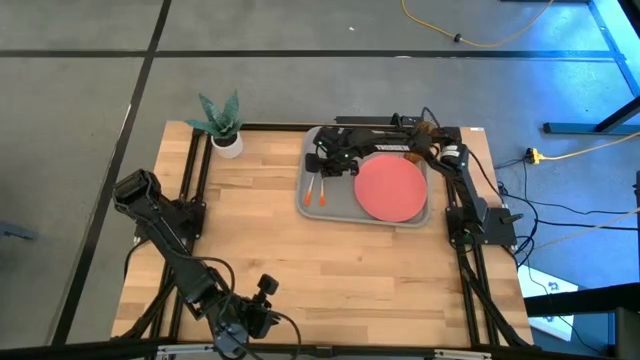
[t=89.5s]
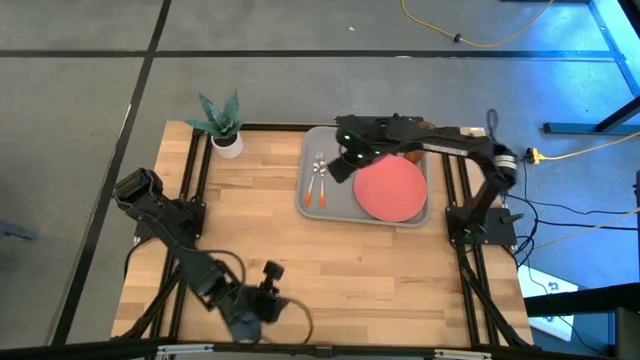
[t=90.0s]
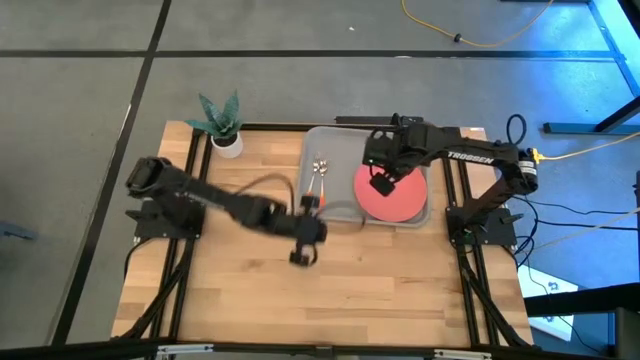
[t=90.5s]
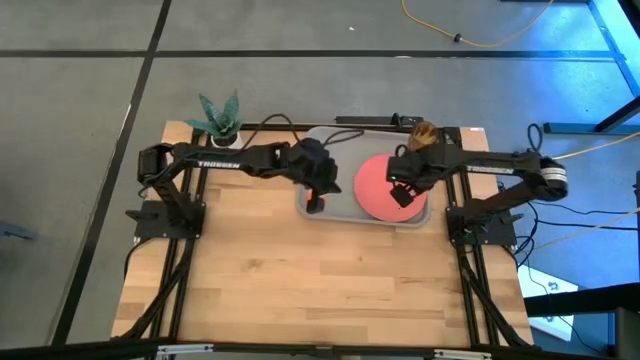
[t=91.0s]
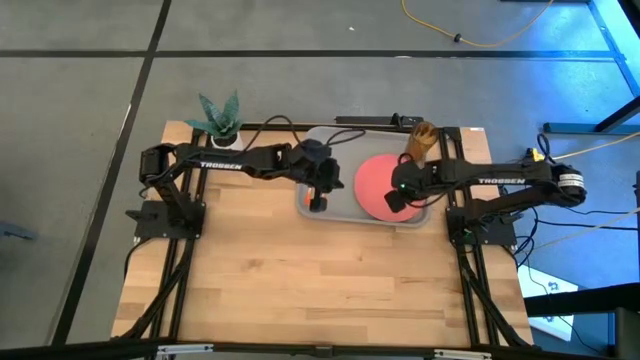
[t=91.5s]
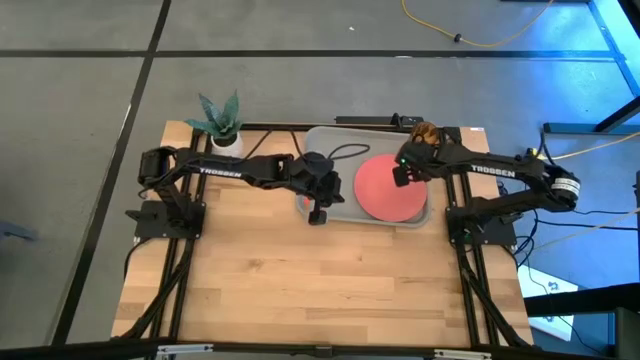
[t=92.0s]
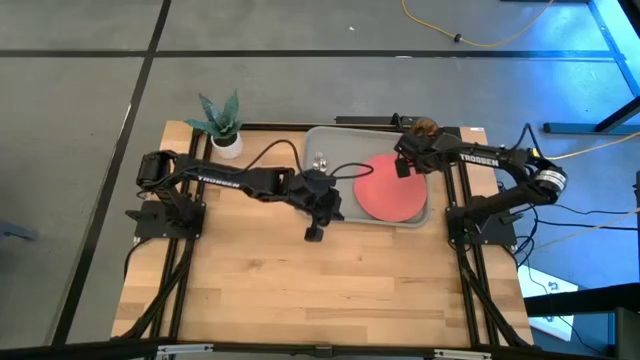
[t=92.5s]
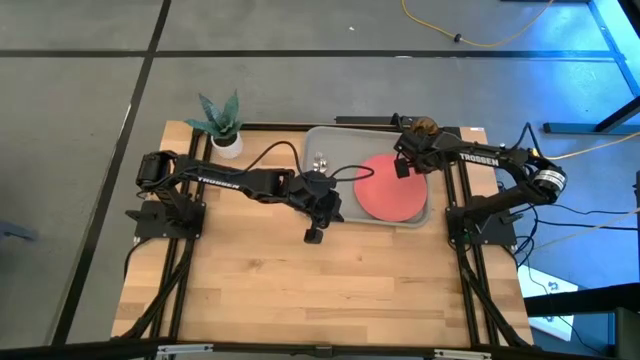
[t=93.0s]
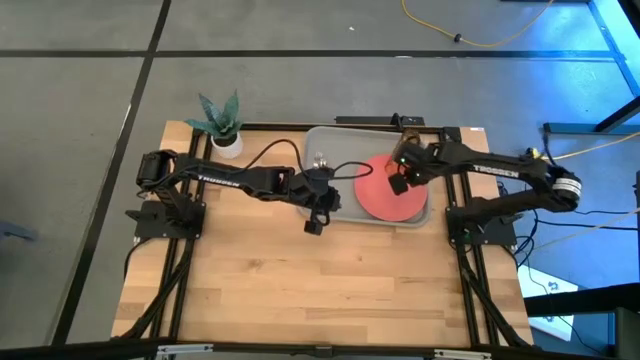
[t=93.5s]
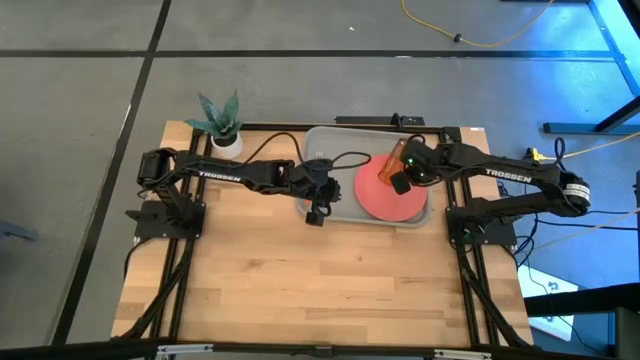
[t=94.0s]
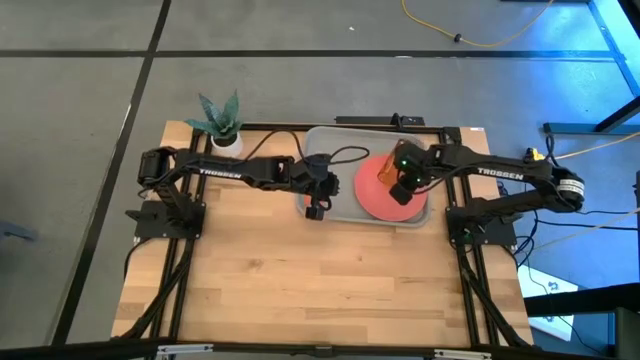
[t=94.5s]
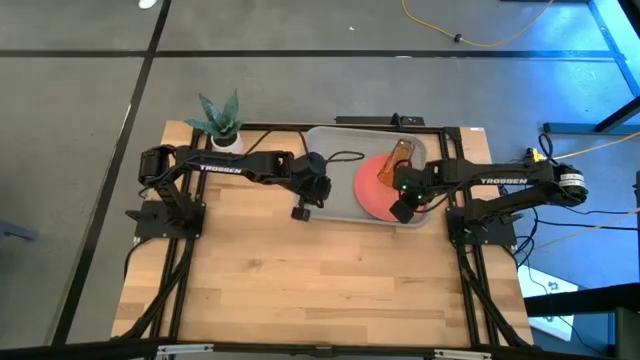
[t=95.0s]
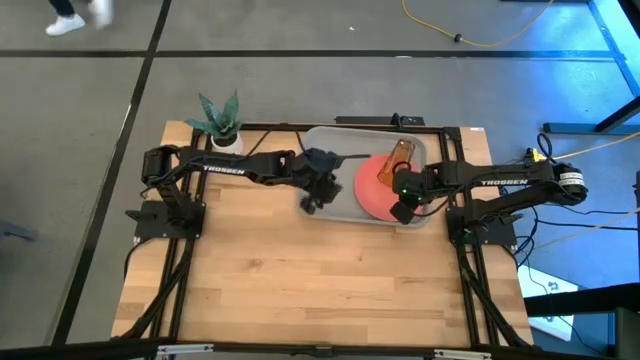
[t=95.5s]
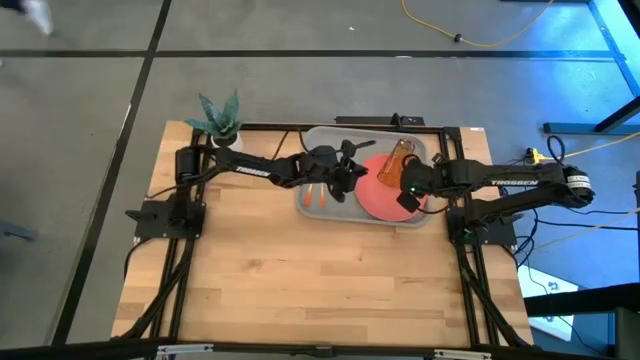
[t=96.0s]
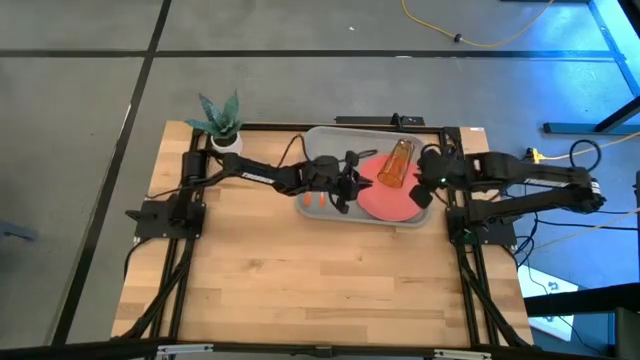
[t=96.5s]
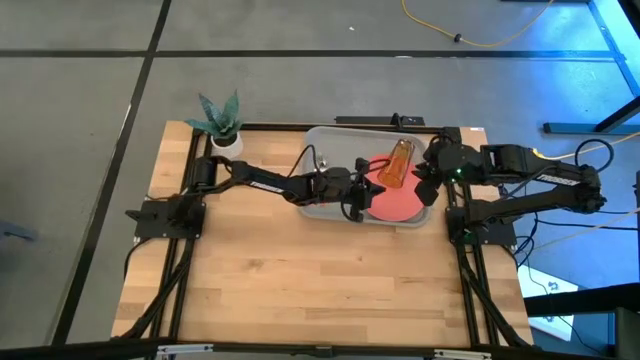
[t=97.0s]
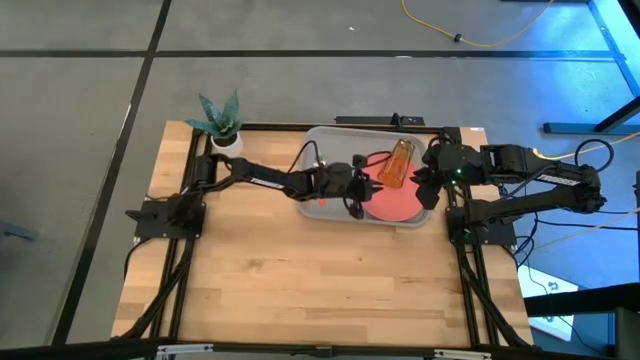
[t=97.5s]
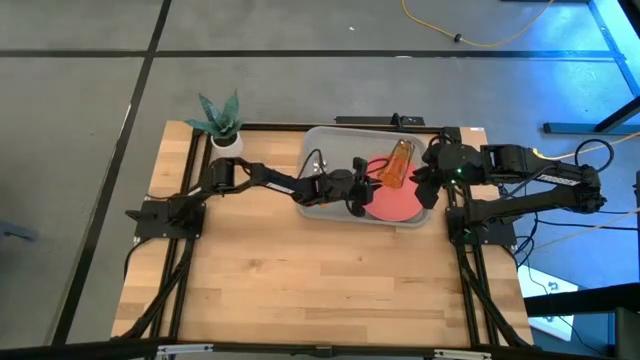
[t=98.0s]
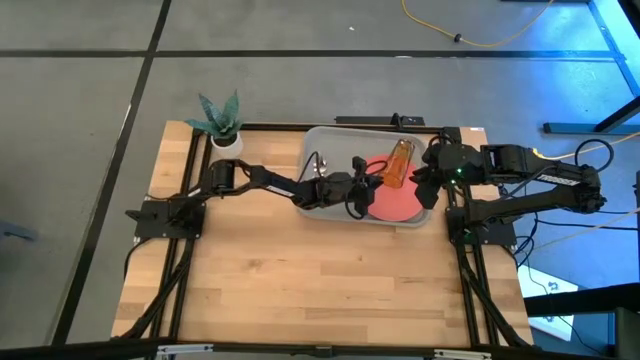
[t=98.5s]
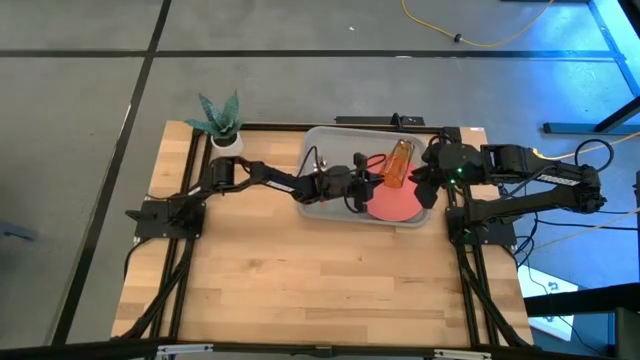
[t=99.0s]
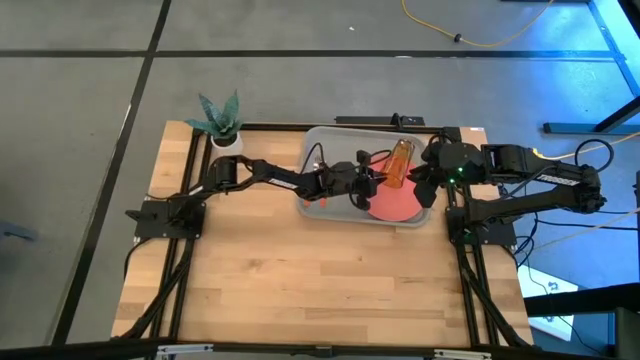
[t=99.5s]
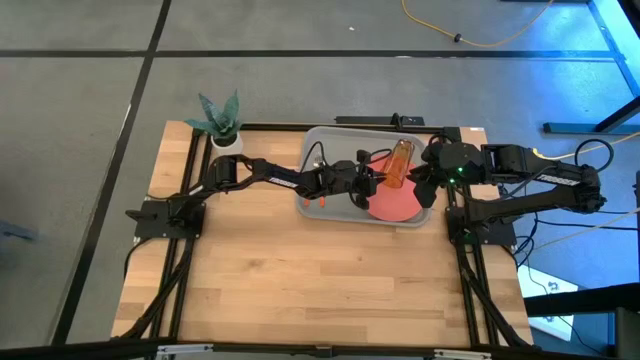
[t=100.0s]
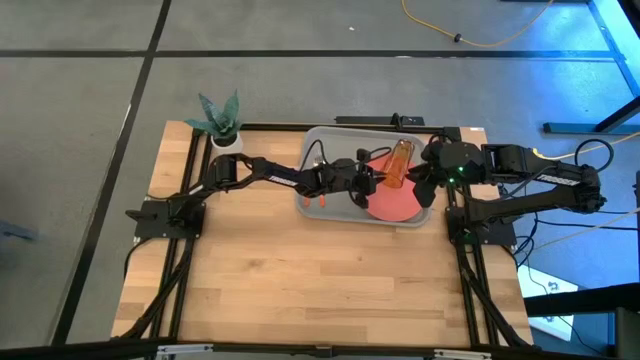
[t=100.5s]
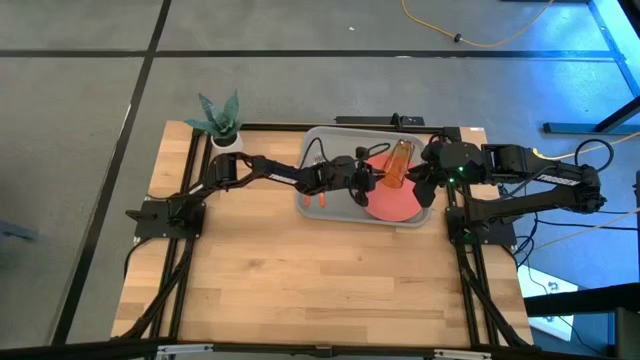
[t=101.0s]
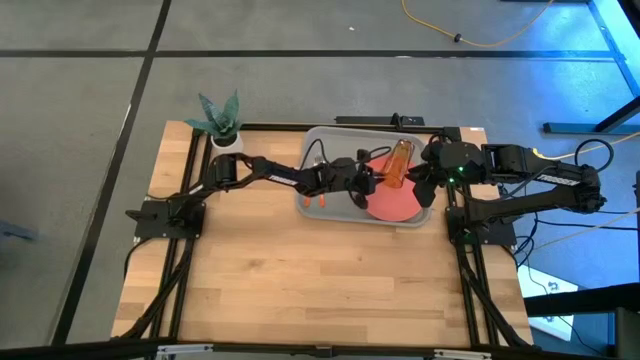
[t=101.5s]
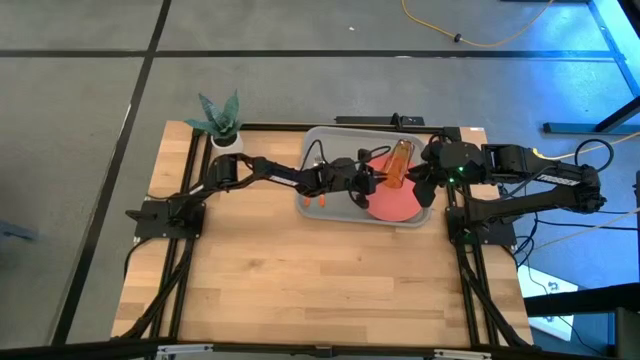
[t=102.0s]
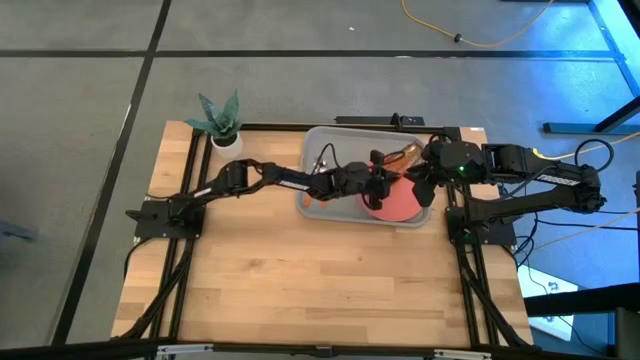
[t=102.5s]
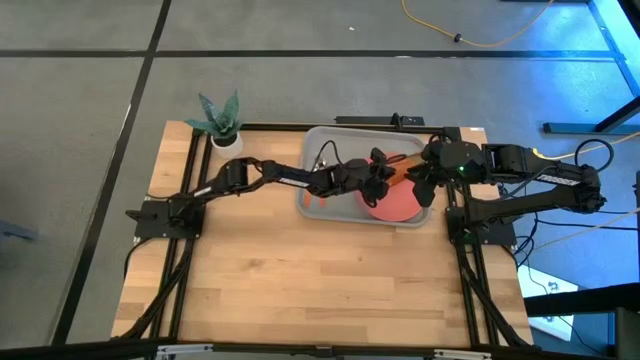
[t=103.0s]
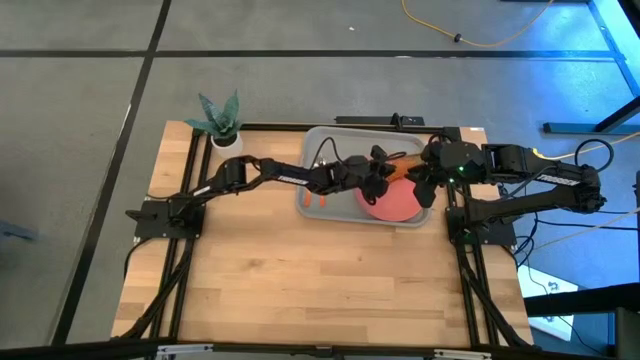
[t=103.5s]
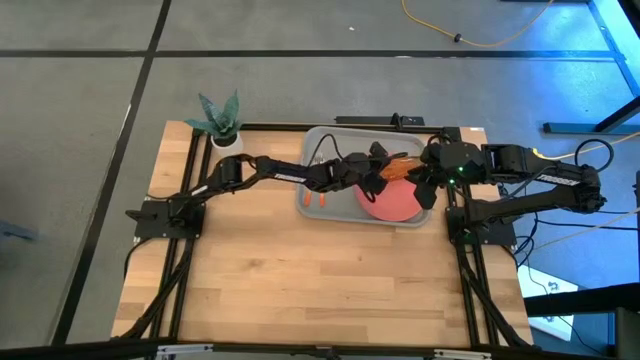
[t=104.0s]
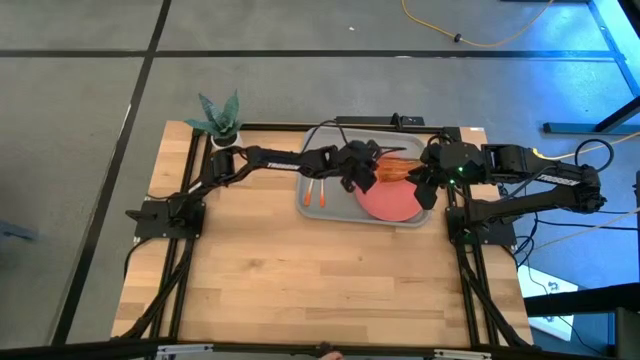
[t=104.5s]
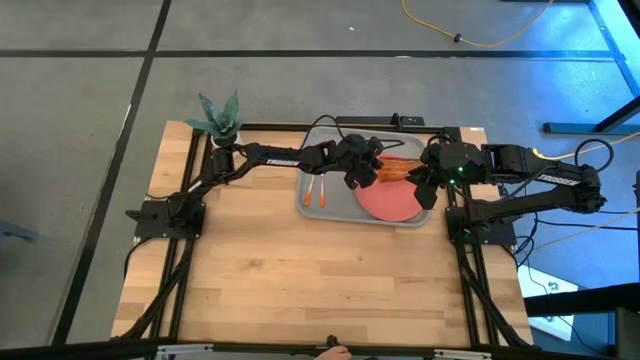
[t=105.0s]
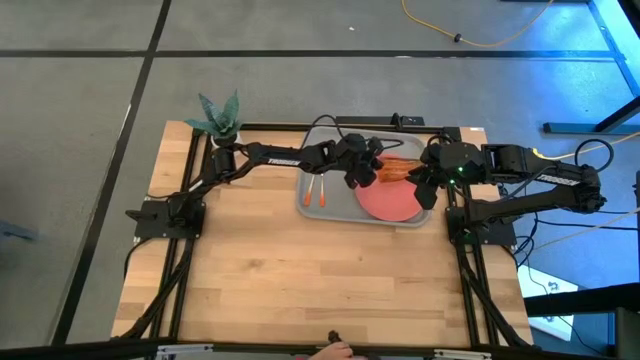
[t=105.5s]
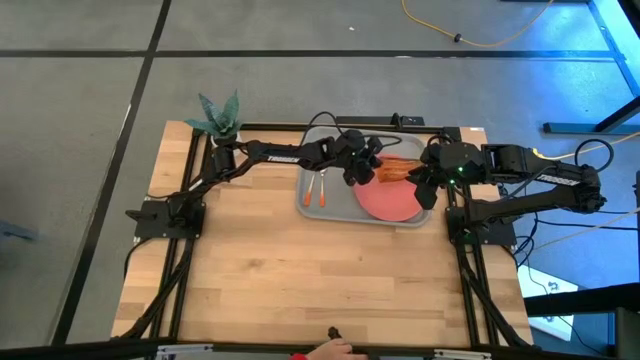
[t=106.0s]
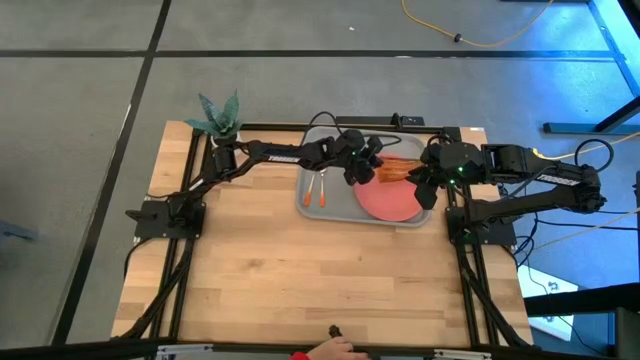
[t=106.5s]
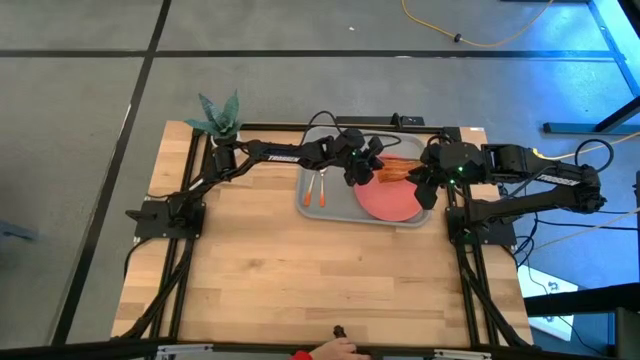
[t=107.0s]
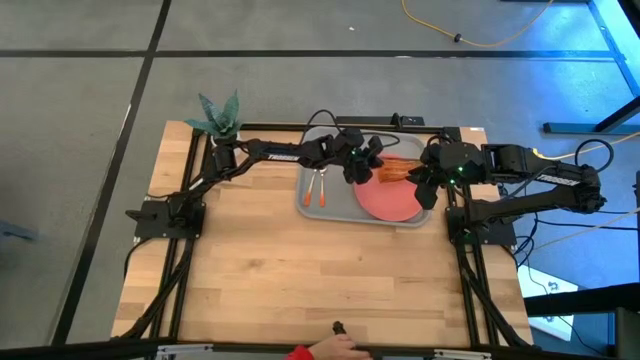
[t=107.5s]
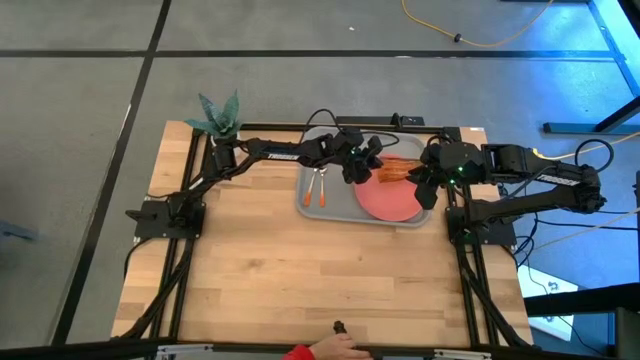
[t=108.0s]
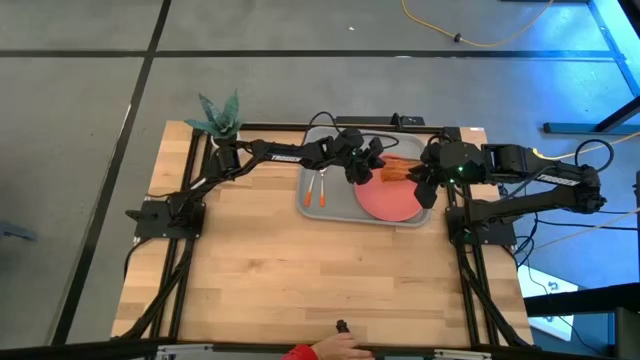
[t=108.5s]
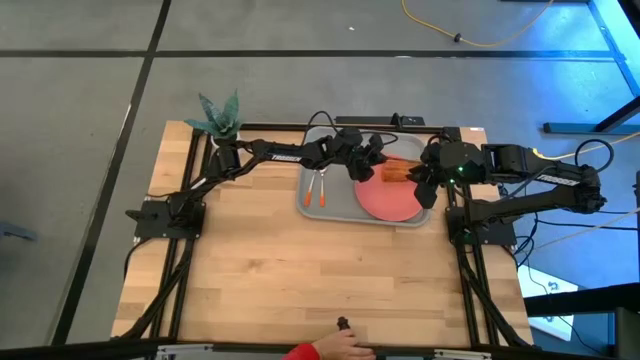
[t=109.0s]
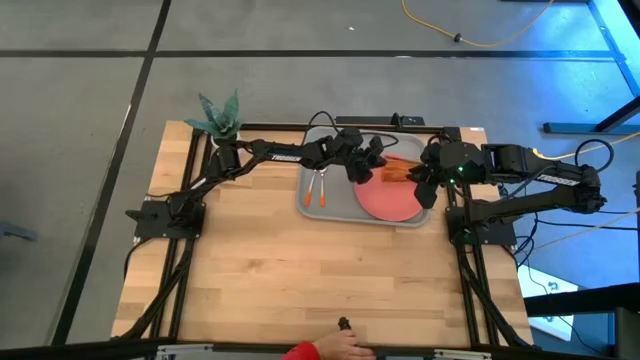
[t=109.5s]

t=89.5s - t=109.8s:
Task: Pick and place plate/cup/fork/spoon on tray
Adjust the orange glass on the gray serving tray

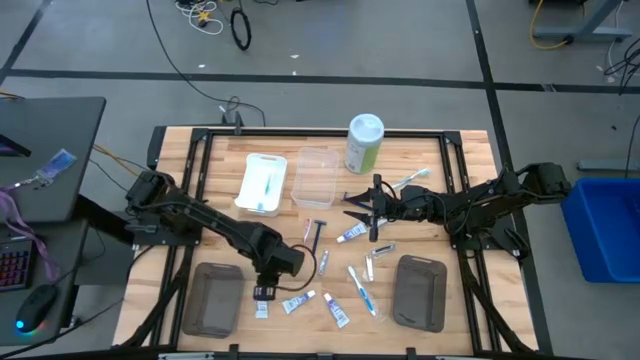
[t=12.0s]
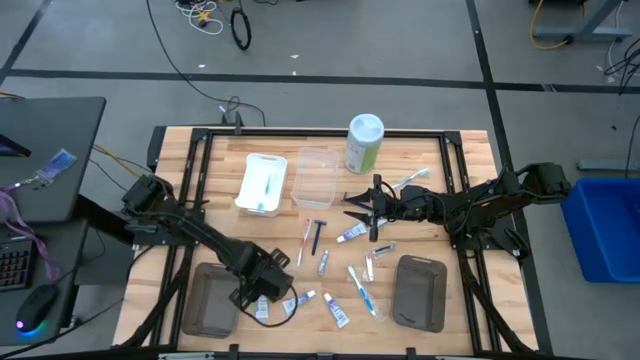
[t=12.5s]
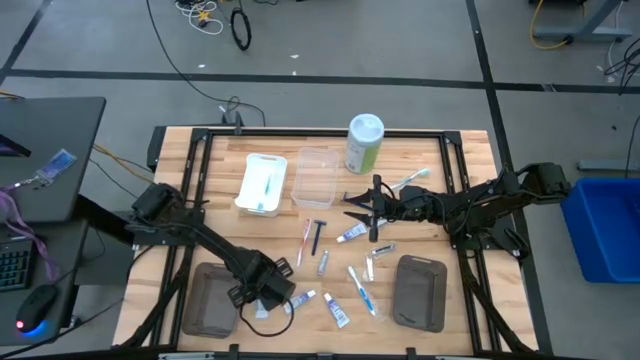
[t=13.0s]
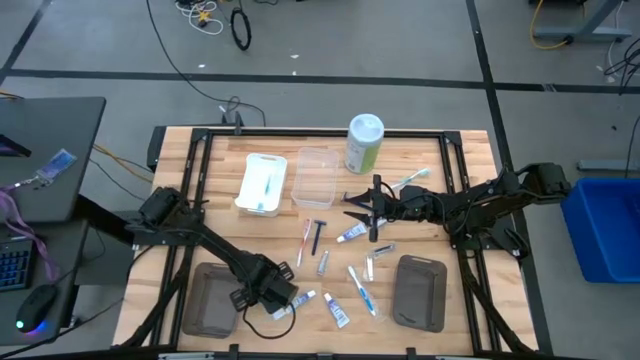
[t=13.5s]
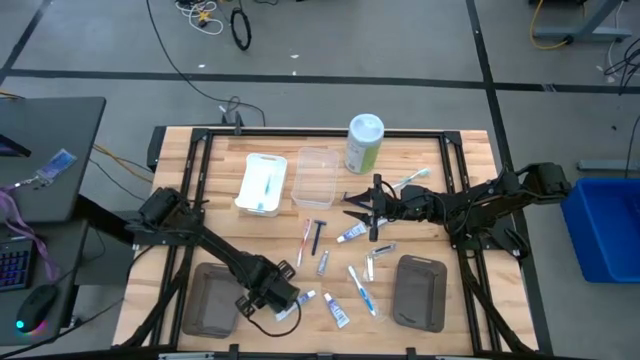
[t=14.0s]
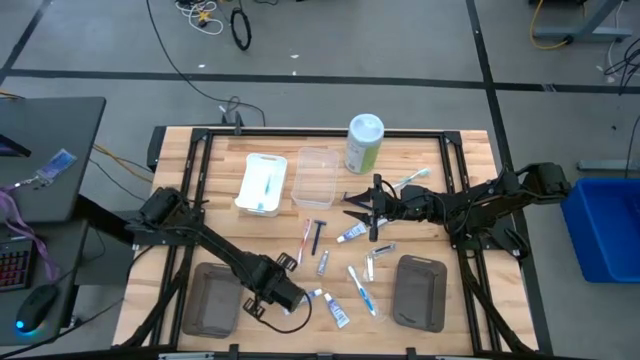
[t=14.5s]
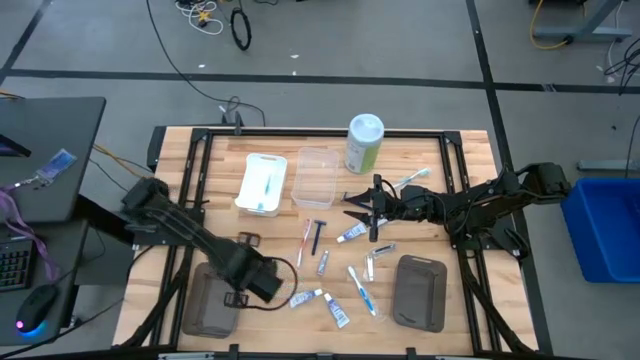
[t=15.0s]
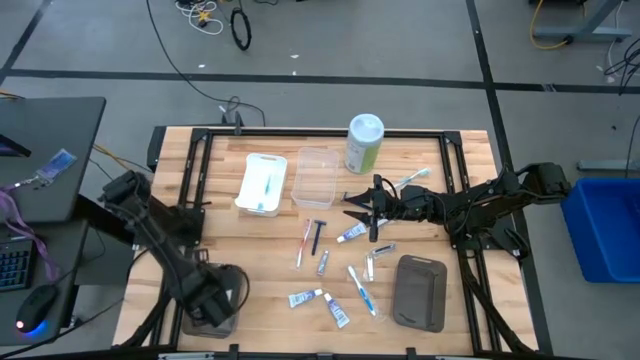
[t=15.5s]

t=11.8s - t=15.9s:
Task: Pick & Place Travel size toiletries
Put the left white toothpaste into the left black bin
